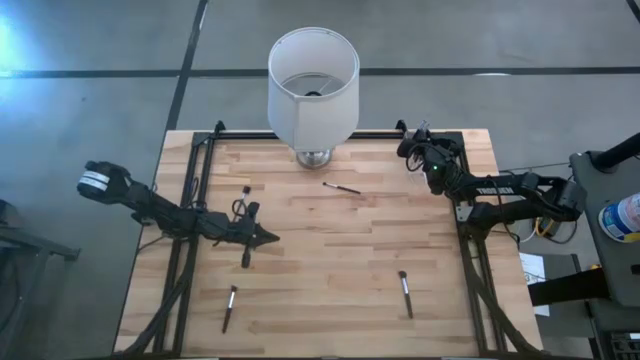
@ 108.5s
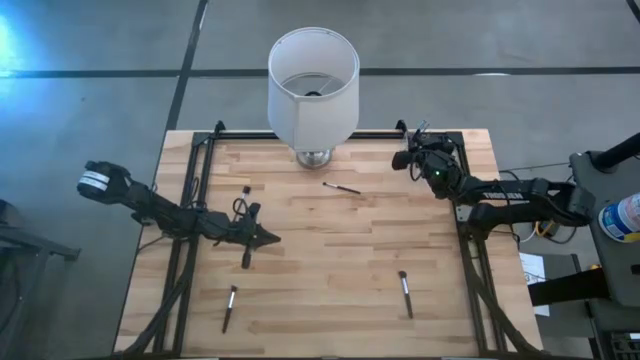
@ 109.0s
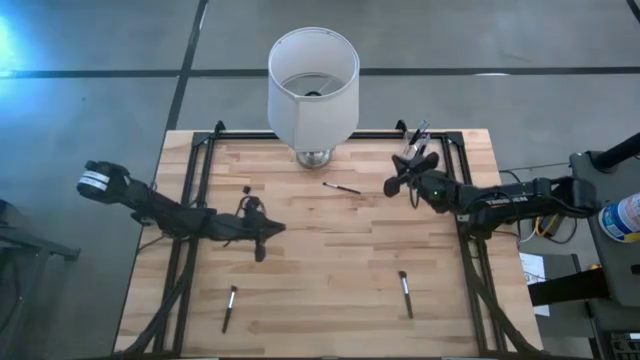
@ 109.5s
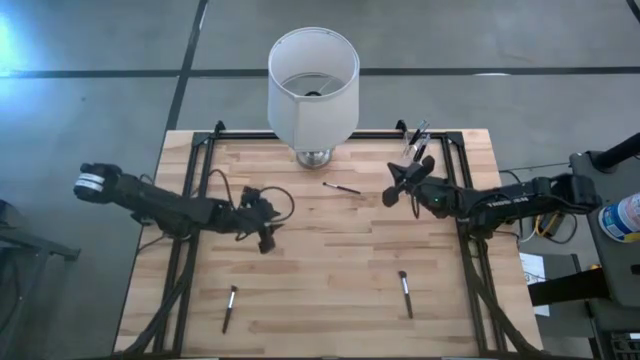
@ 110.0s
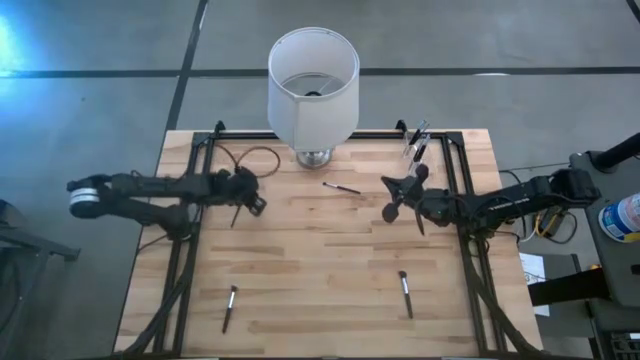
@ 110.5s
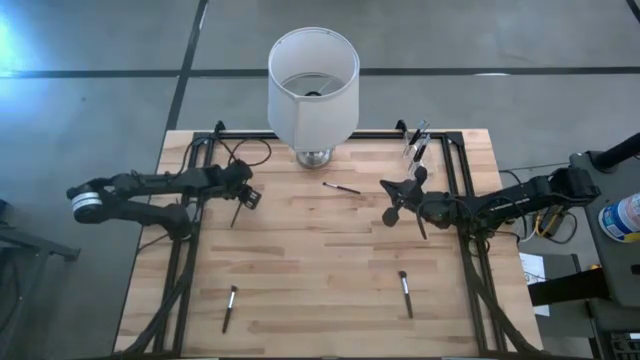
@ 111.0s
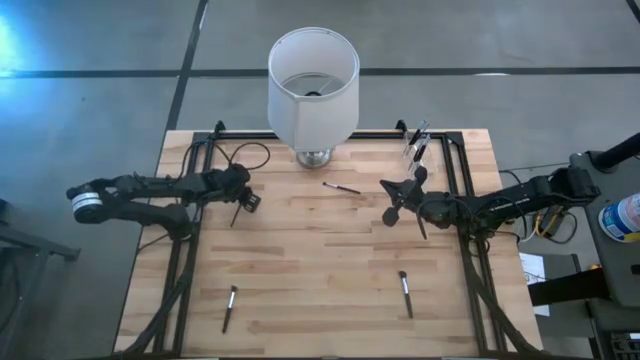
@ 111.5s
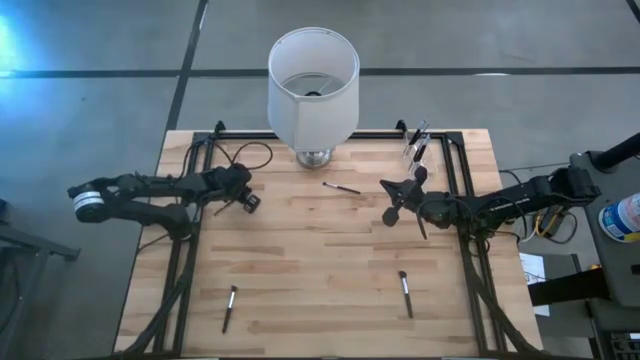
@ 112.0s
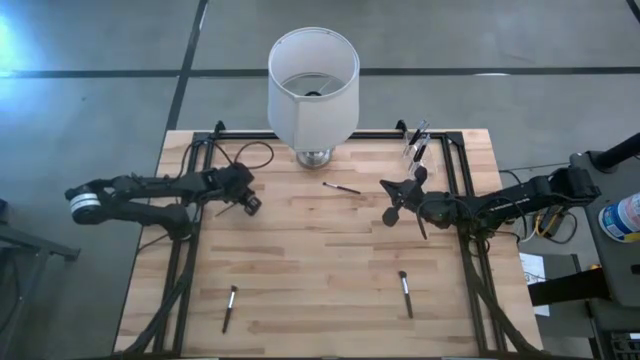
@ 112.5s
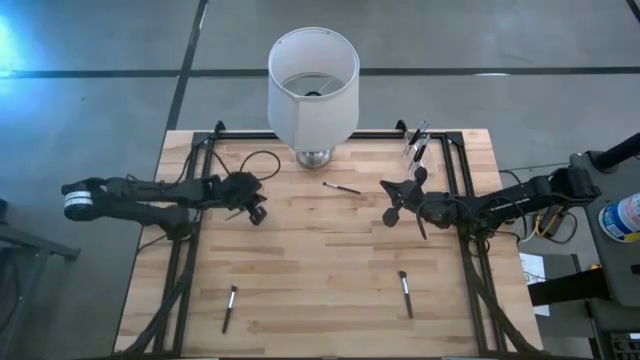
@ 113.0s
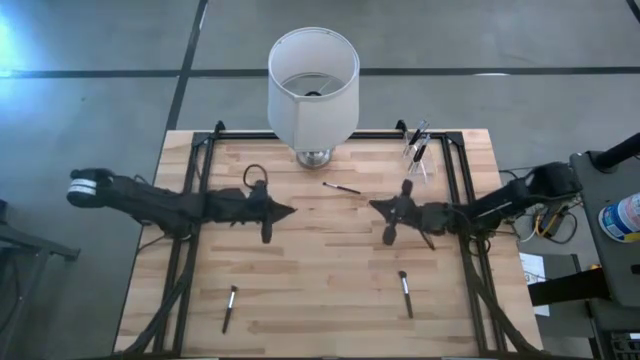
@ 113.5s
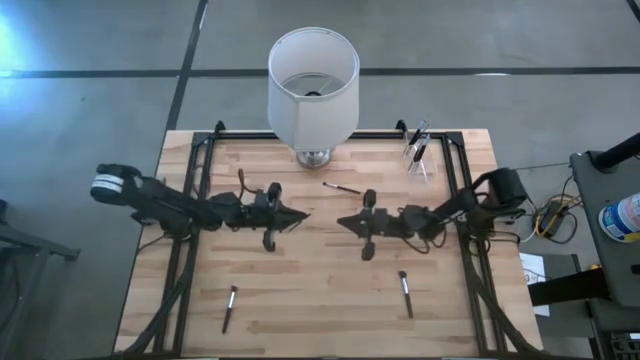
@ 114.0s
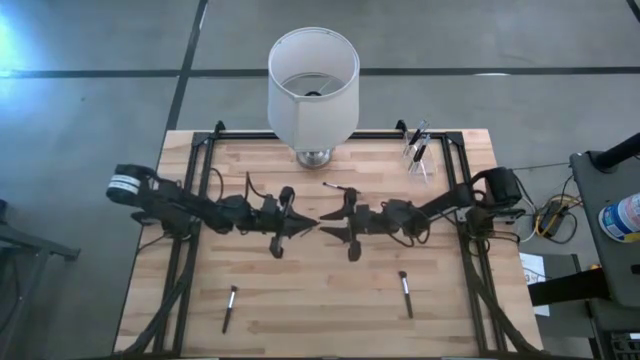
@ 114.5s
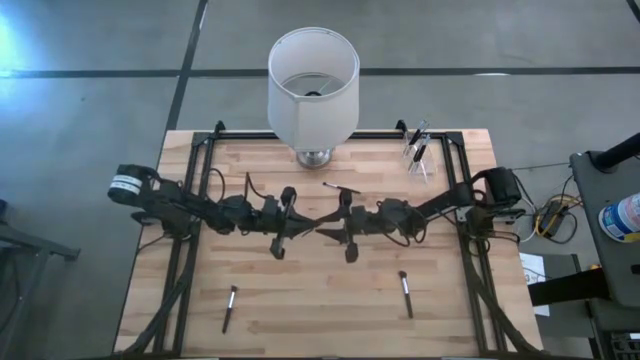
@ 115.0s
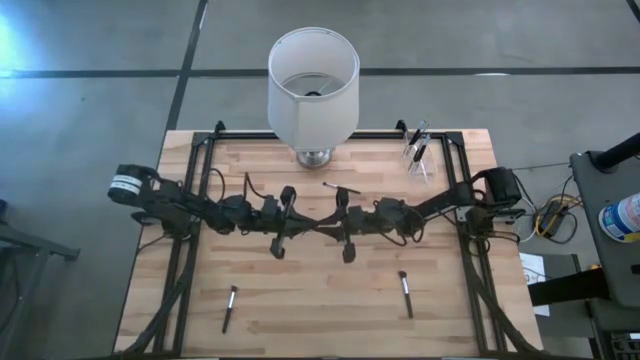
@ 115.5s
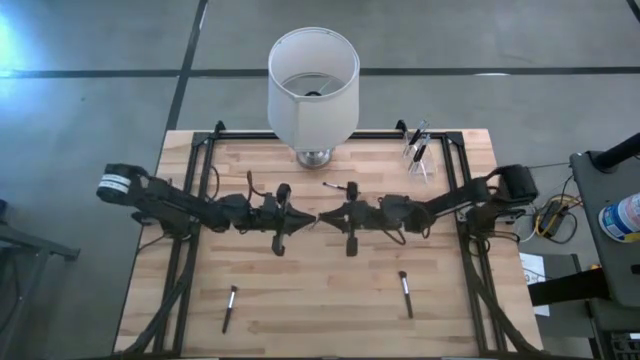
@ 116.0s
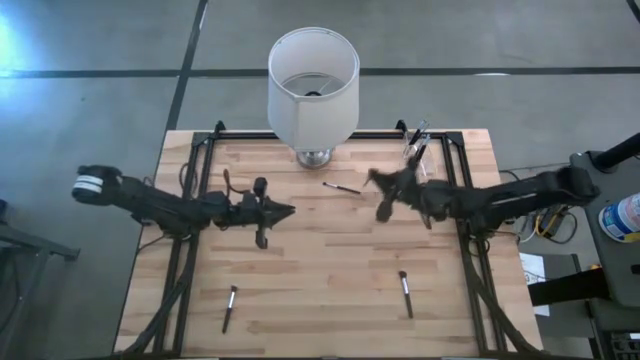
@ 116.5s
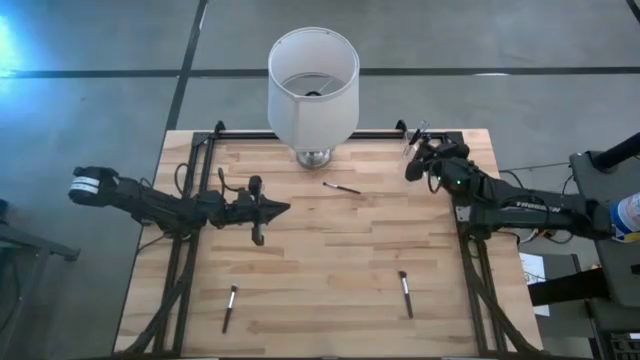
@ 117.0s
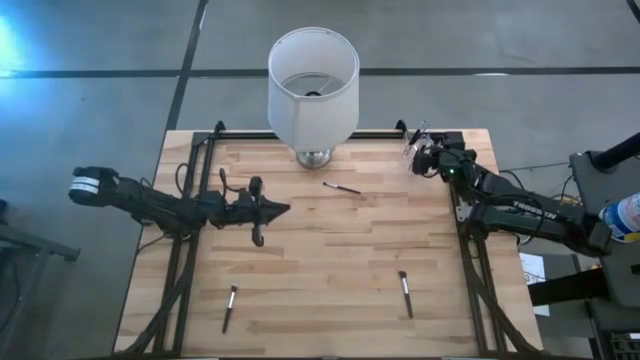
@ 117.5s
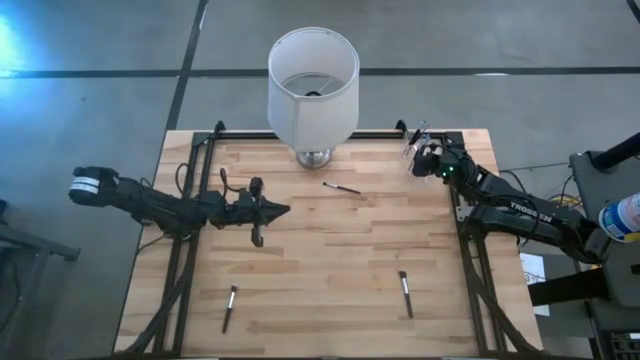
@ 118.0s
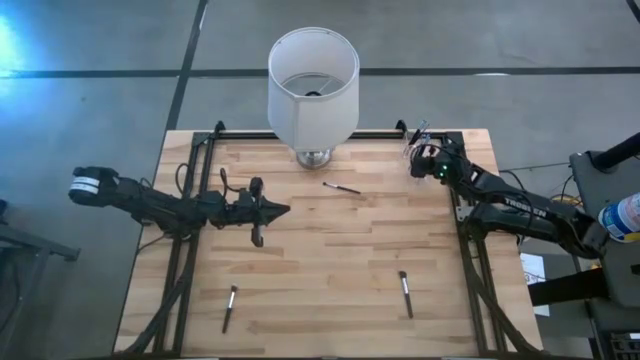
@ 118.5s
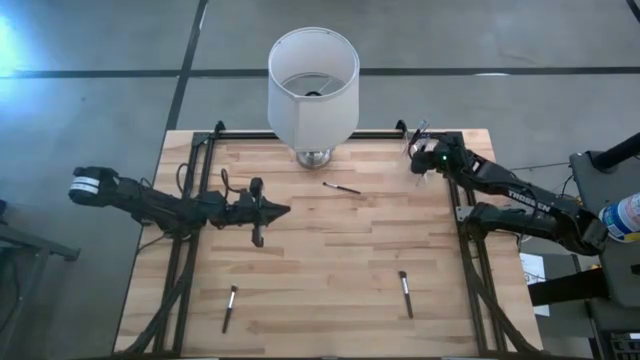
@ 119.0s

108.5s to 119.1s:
Task: Put items in baskets/containers
Put the eye groomer brush into the transparent organizer

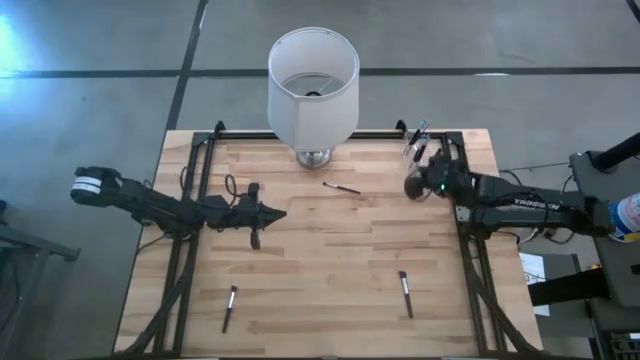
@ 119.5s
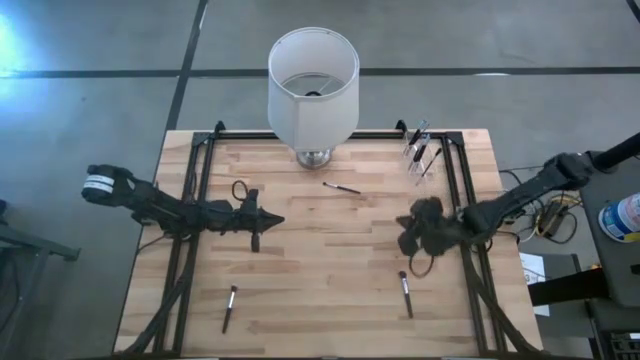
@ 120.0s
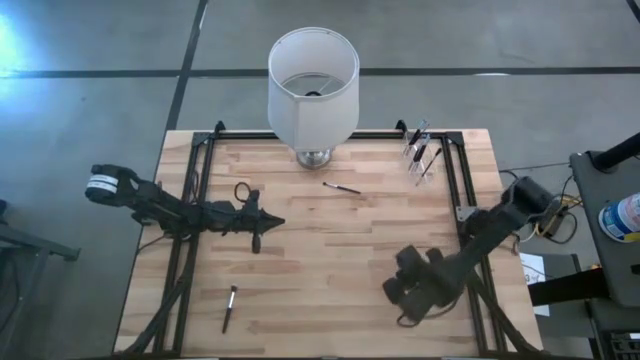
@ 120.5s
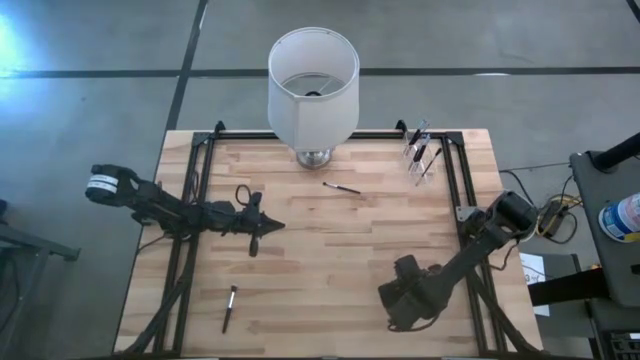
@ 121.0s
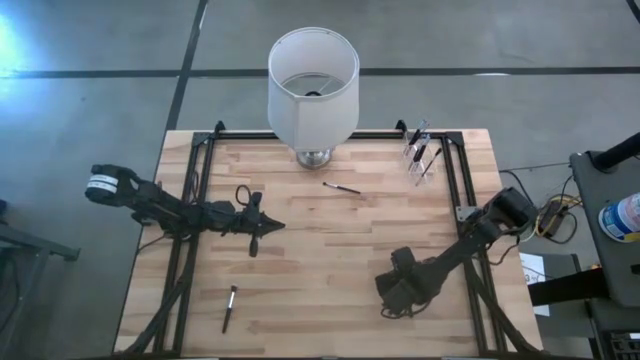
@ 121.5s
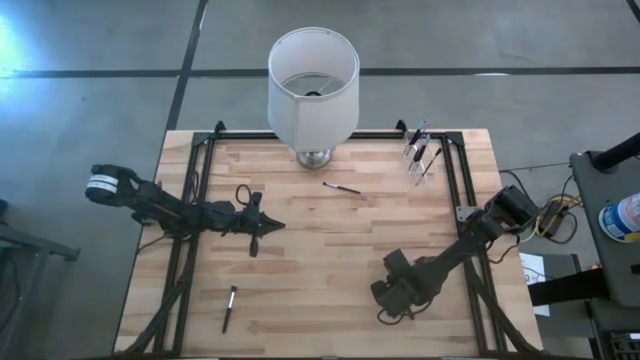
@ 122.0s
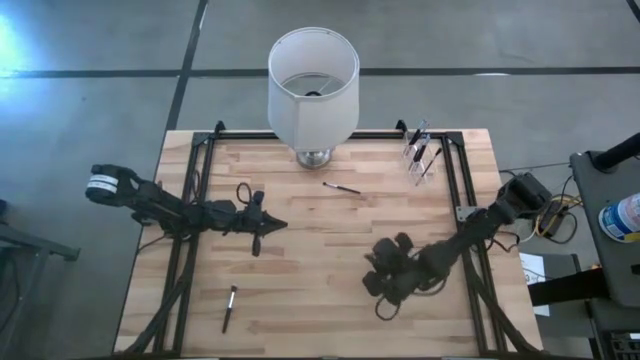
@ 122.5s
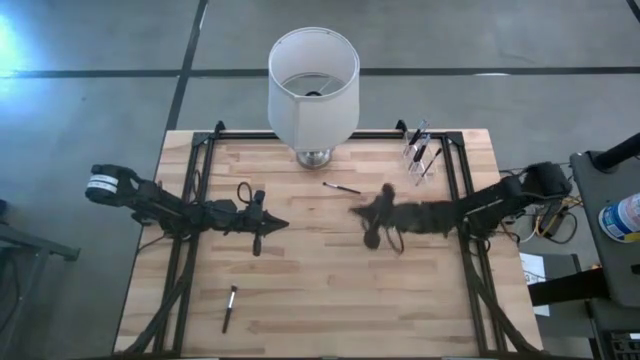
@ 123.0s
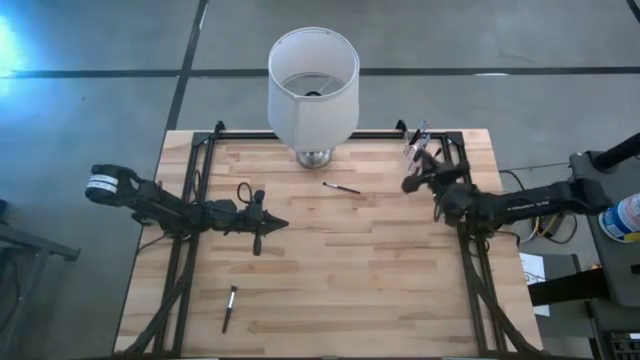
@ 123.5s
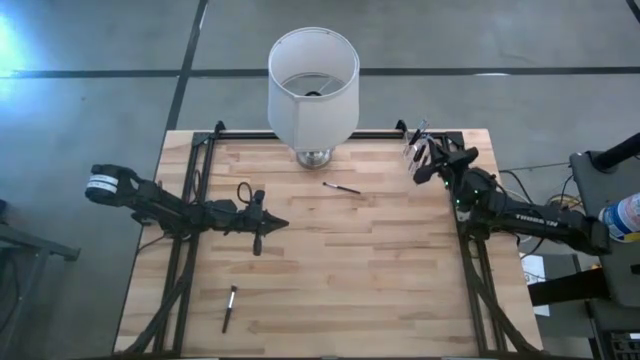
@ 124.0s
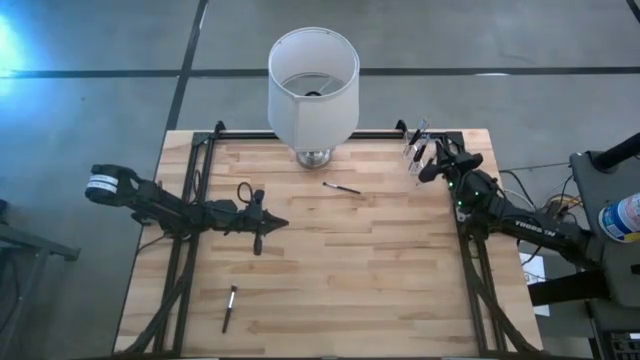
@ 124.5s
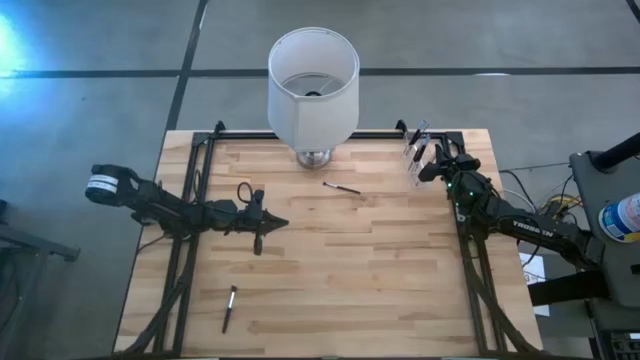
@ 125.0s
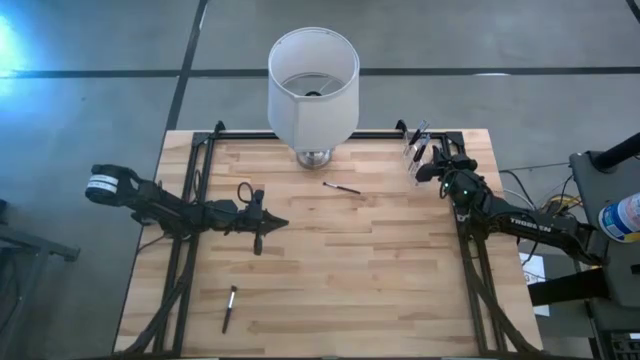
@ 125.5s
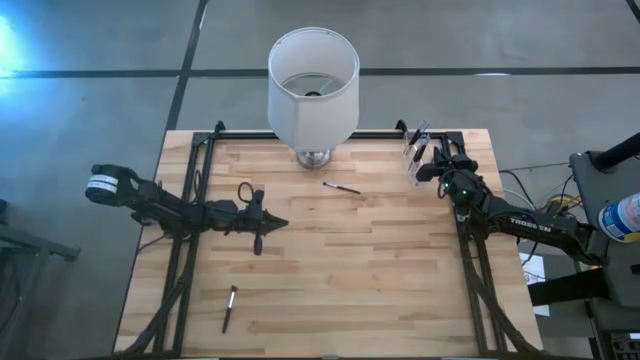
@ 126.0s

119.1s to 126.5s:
Put the powder brush into the transparent organizer

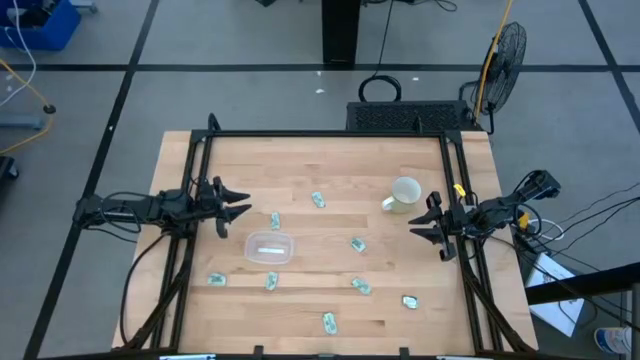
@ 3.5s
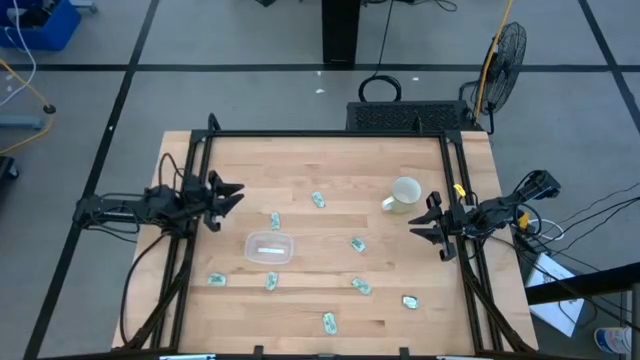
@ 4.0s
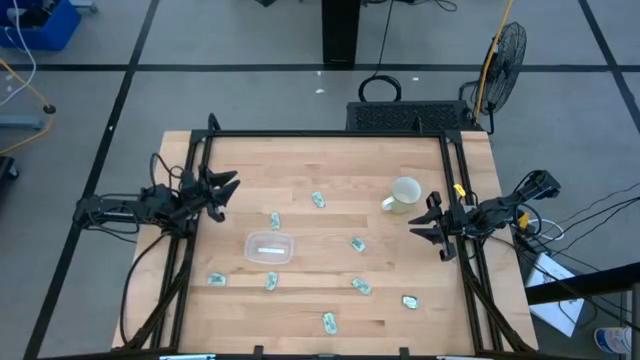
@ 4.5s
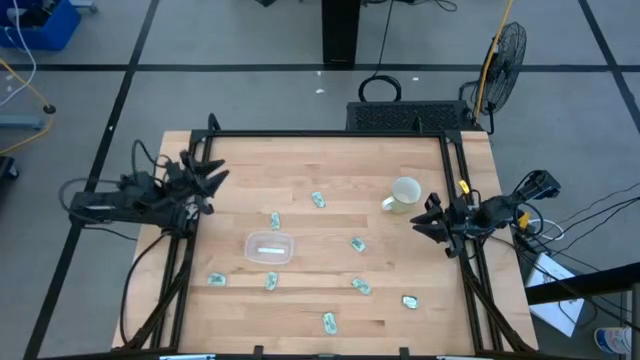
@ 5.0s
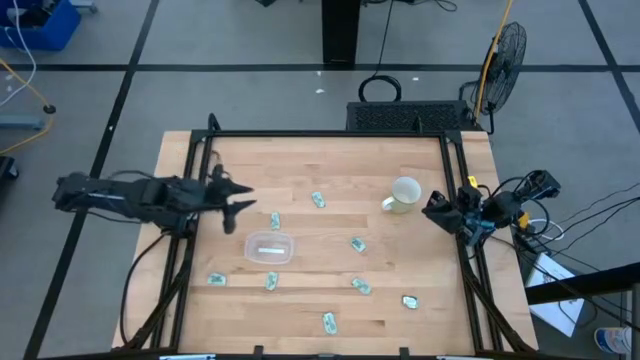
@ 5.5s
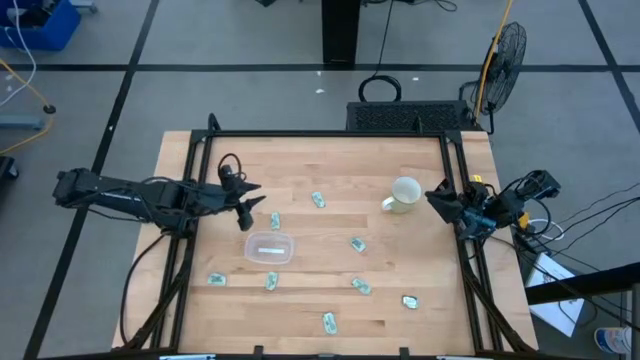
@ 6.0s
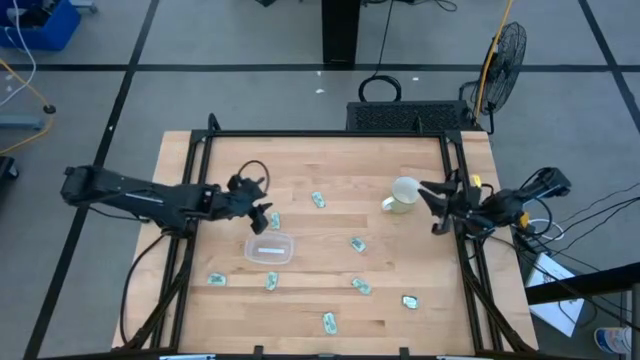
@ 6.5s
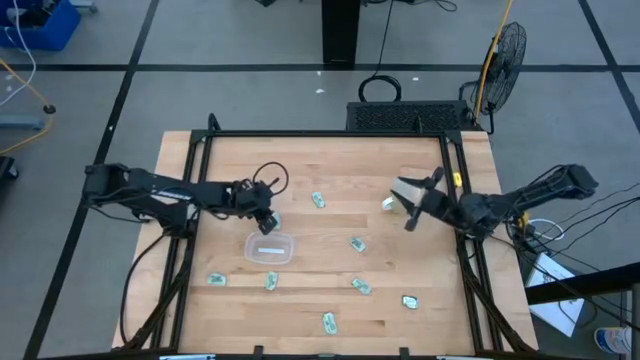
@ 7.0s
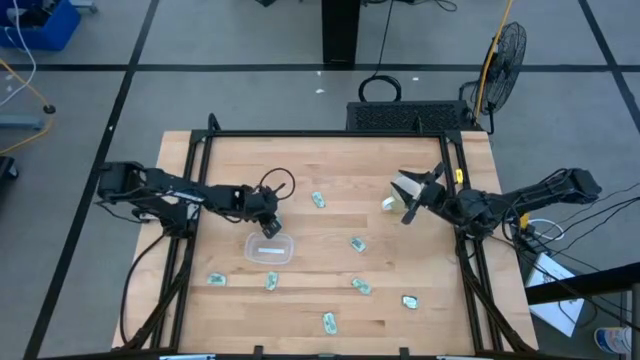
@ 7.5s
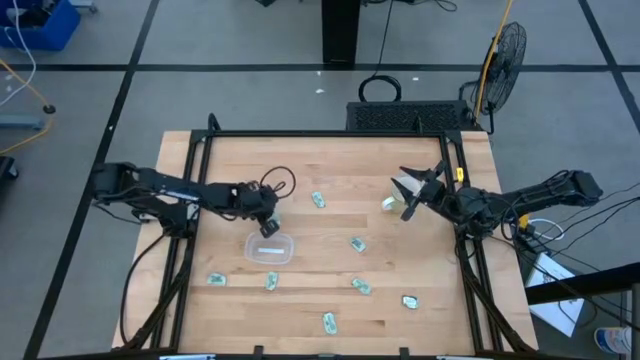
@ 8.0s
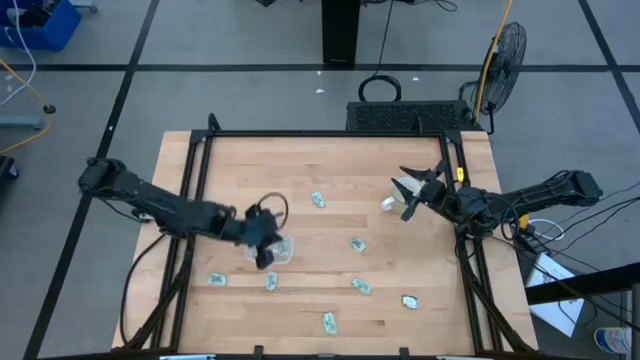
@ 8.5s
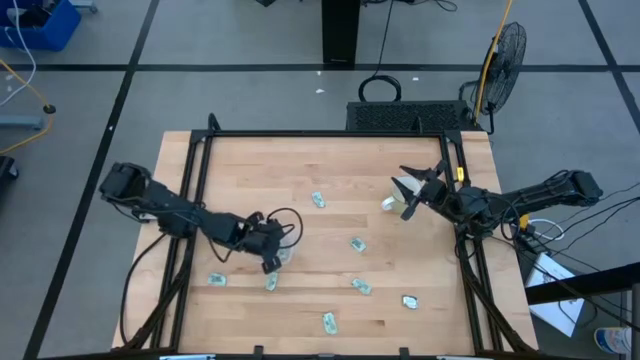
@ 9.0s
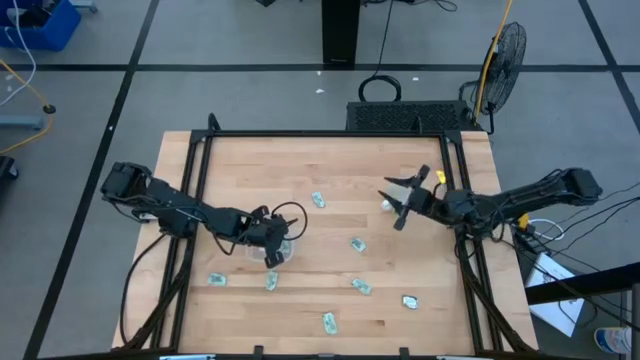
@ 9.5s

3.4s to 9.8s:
Task: Pick and place Stevia / Truvia into bins
Put the stevia packet into the transparent bin
